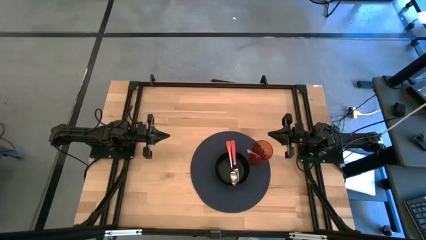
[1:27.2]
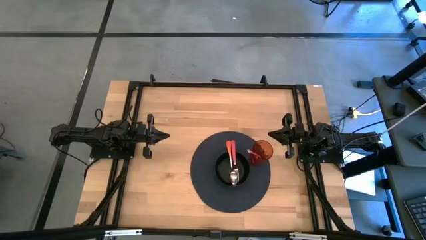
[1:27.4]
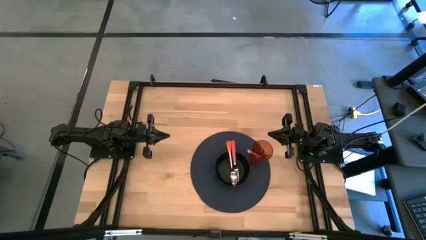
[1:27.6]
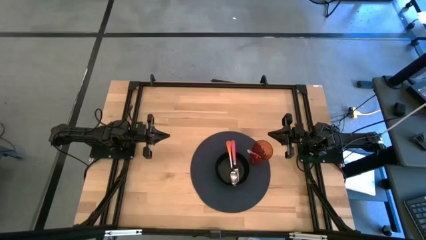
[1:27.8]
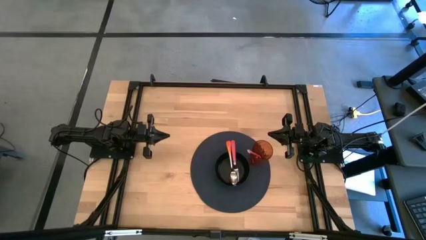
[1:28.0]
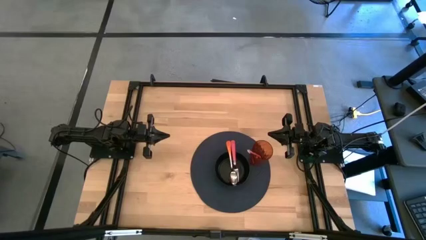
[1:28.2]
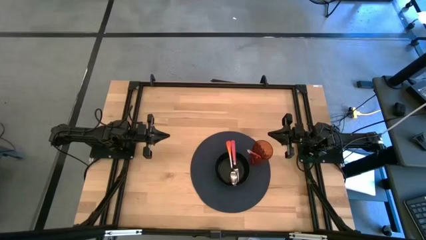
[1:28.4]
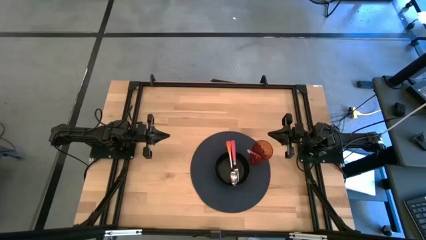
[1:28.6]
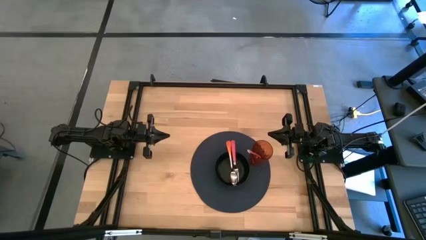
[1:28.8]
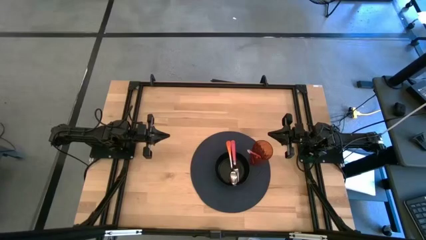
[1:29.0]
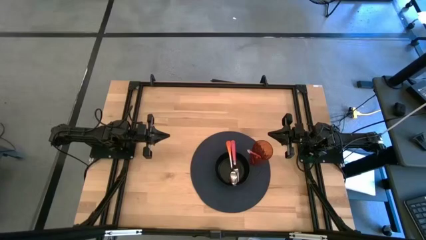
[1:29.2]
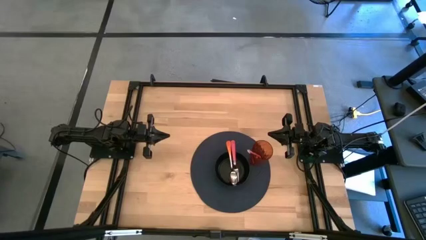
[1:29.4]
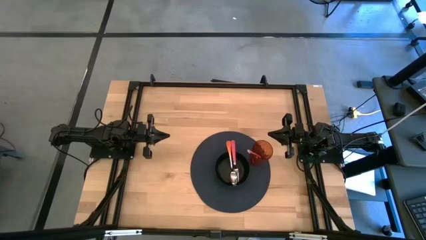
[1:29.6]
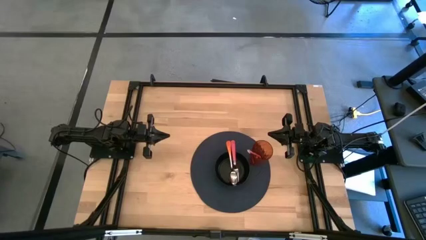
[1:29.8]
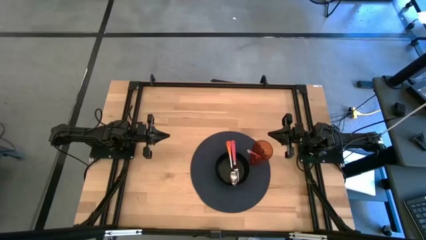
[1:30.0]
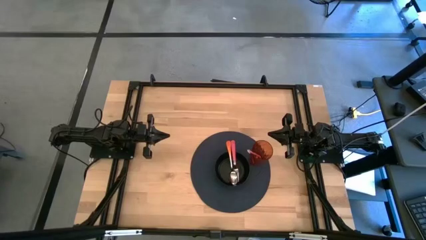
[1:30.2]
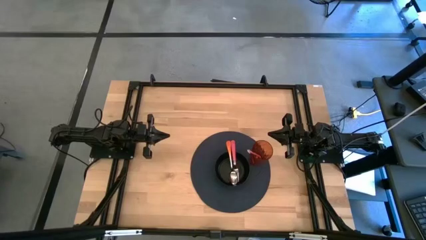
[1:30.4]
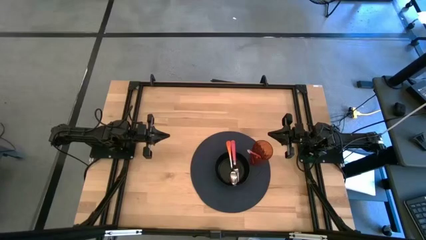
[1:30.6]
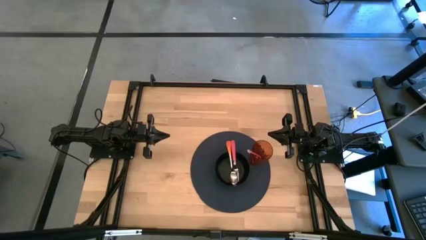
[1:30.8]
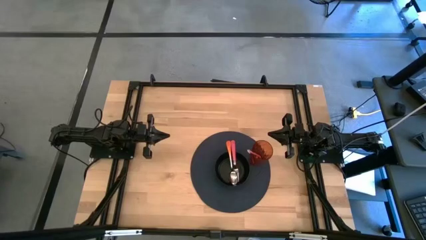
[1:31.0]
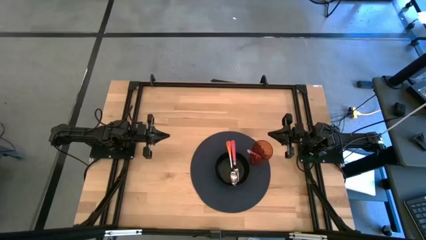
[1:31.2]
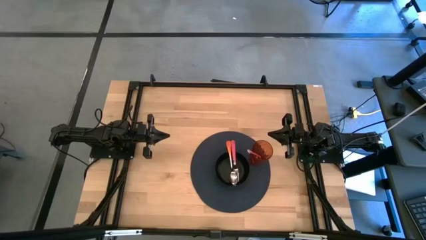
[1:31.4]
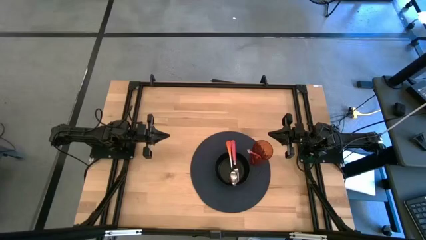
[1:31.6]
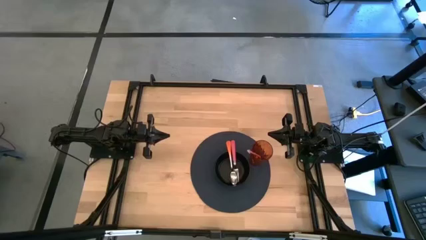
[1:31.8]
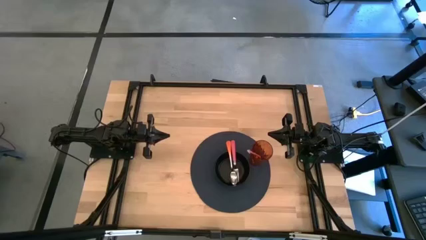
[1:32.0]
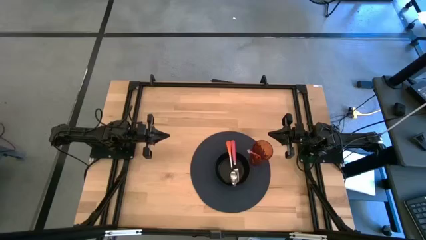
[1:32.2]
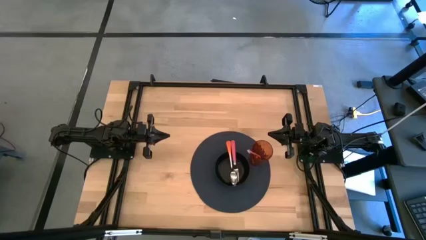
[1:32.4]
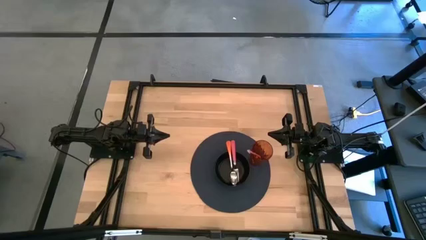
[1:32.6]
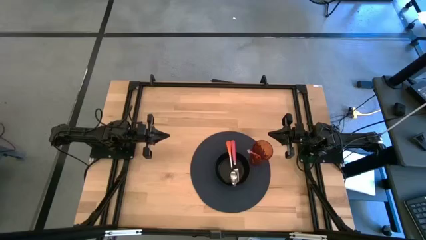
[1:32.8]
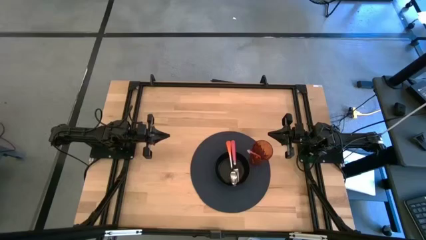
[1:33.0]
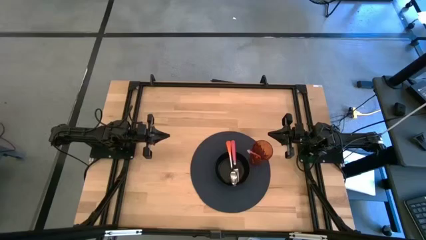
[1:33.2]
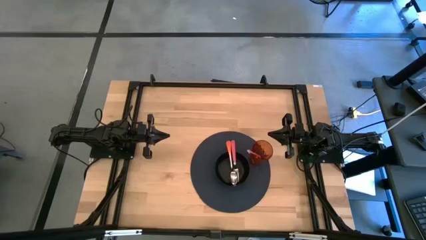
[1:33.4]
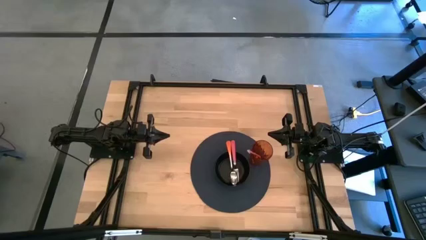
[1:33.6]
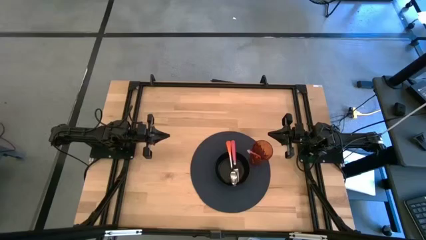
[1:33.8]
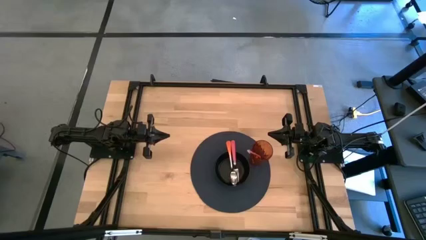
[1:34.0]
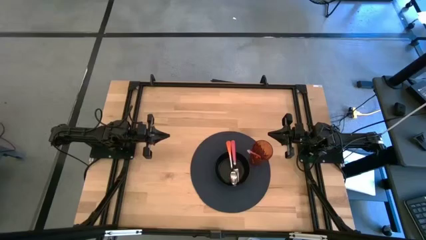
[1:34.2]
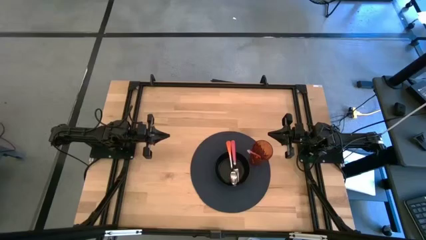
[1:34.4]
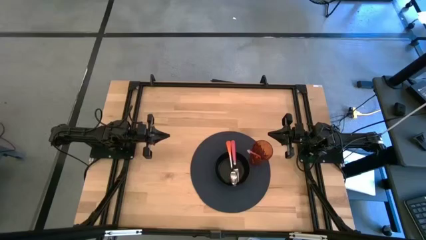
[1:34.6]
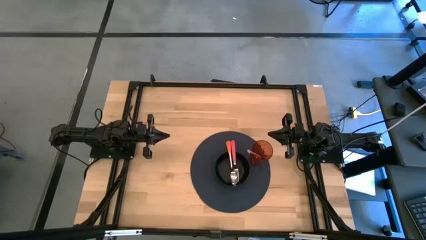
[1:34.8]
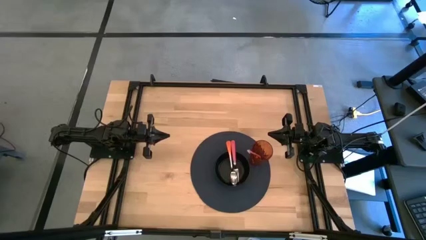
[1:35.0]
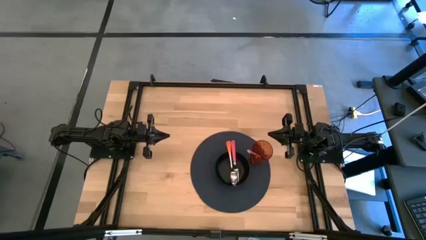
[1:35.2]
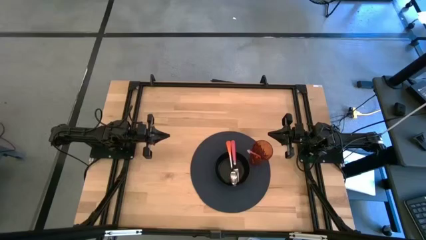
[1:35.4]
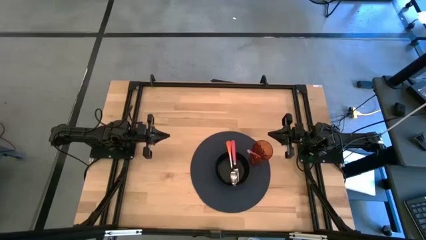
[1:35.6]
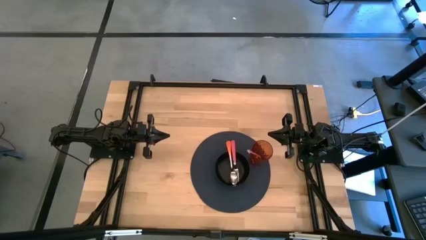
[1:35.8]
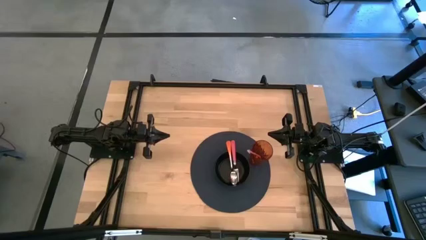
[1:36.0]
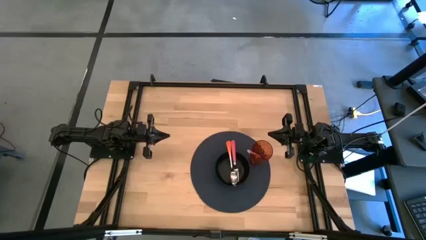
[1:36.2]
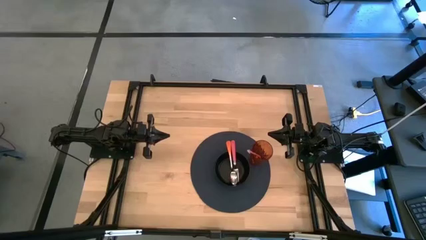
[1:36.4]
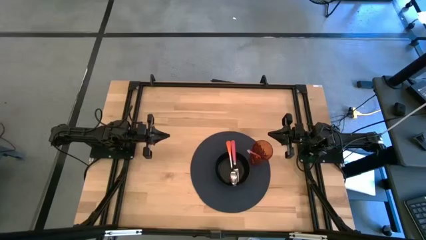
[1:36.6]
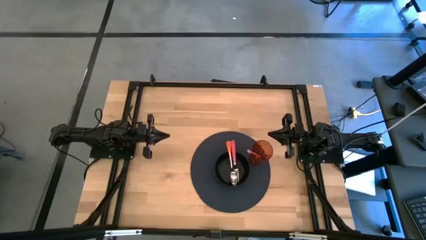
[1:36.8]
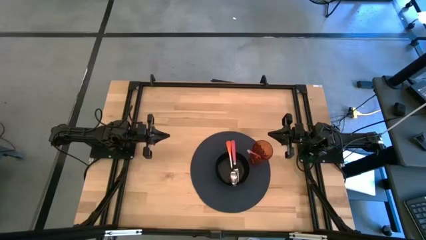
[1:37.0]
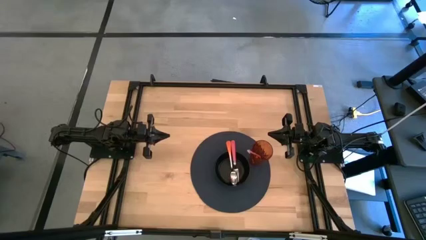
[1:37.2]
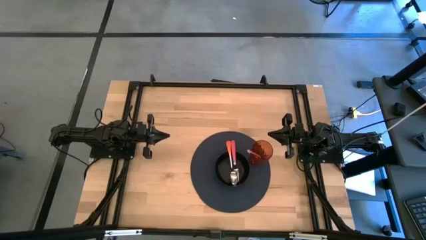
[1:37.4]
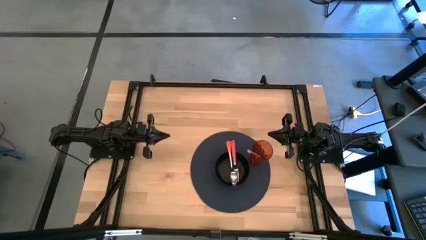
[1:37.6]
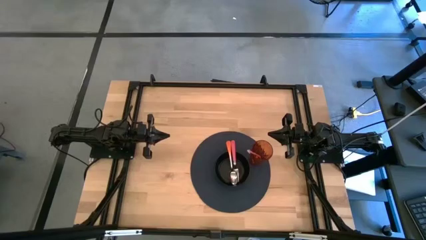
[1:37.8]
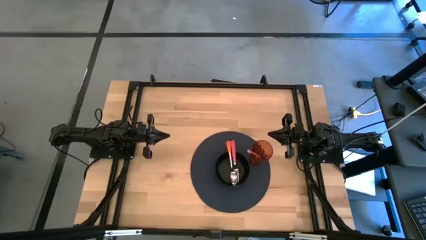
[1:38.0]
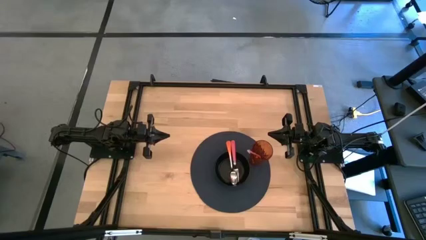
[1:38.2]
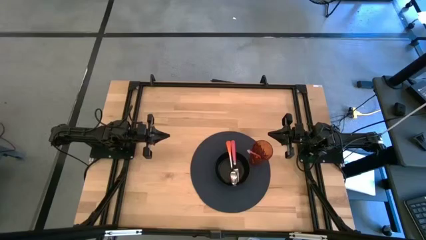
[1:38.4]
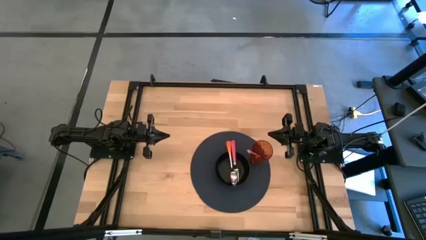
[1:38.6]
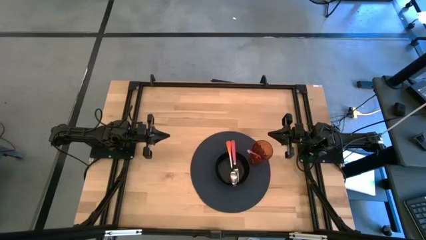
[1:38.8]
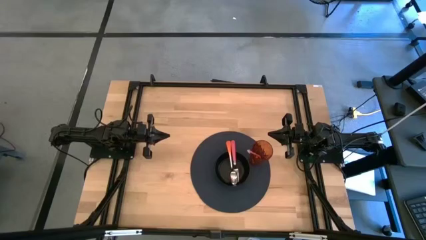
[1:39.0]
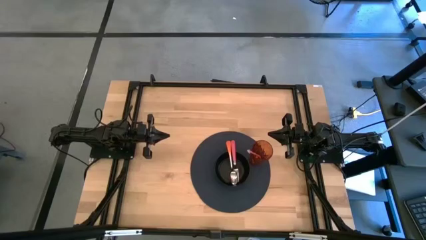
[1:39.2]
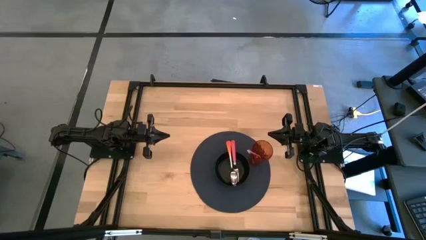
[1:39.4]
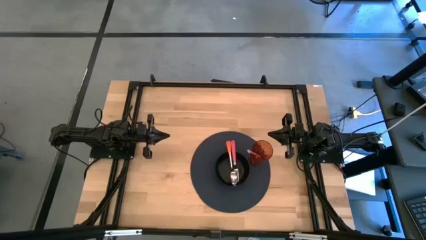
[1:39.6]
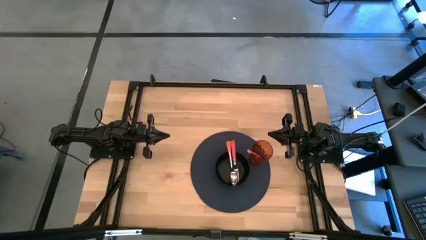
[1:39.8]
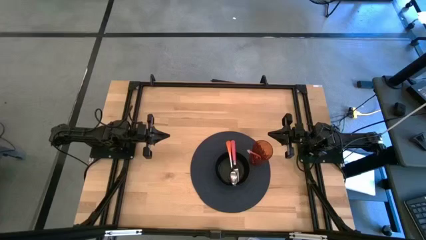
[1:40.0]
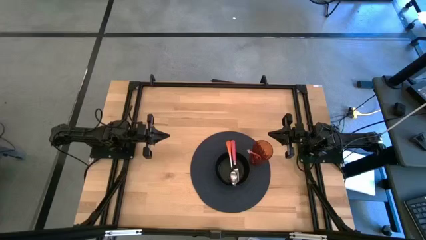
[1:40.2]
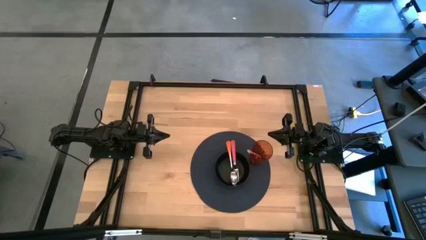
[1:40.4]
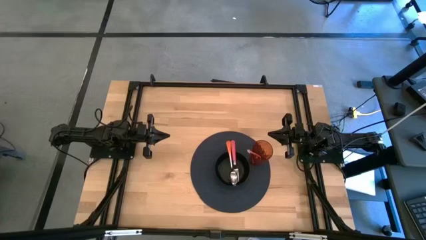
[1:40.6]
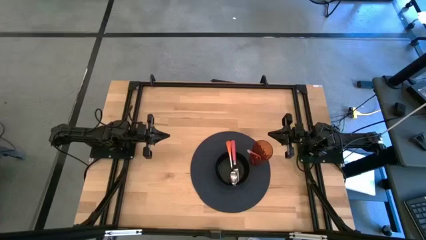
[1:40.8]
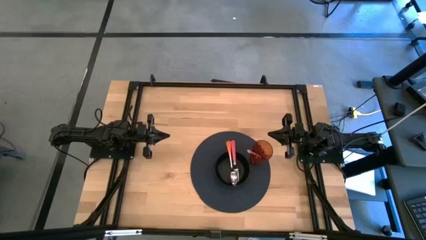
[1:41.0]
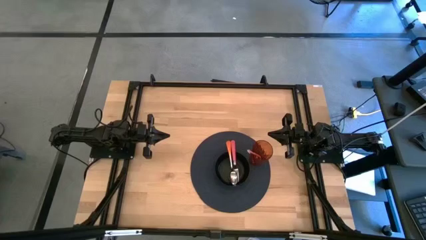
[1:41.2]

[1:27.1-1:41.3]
Task: Pick & Place Utensil
Return to Home Position

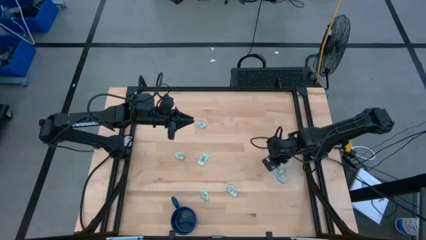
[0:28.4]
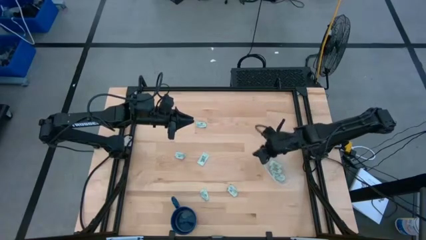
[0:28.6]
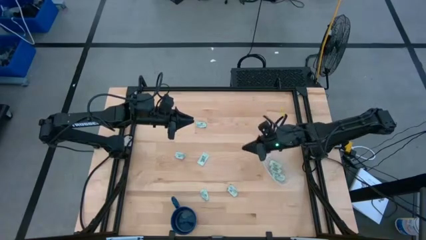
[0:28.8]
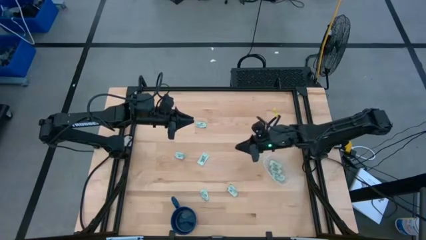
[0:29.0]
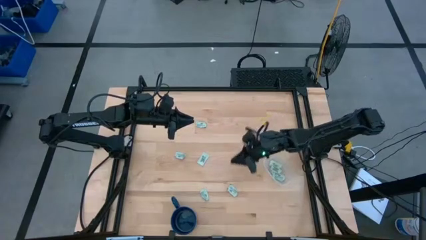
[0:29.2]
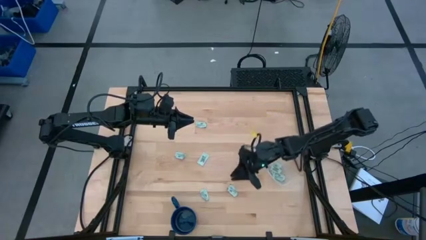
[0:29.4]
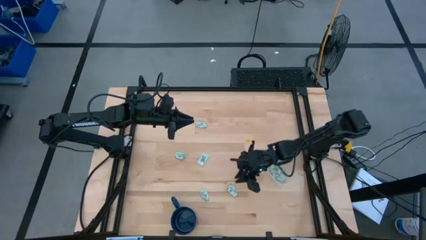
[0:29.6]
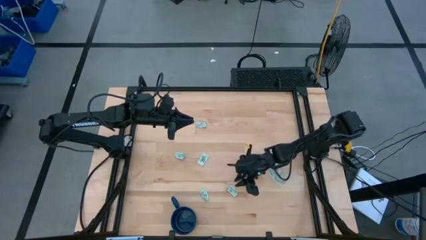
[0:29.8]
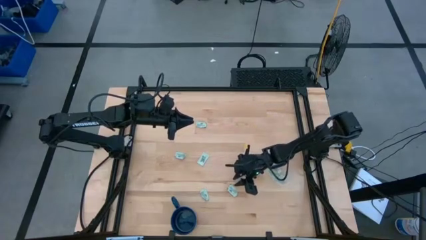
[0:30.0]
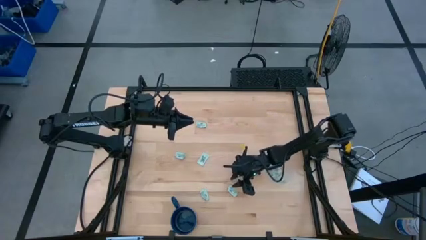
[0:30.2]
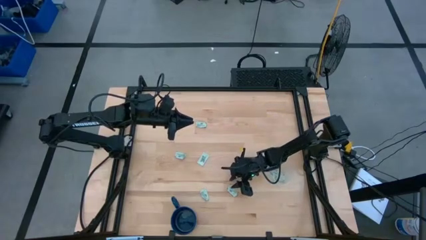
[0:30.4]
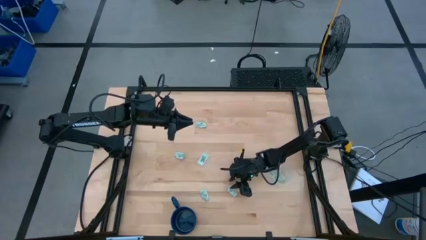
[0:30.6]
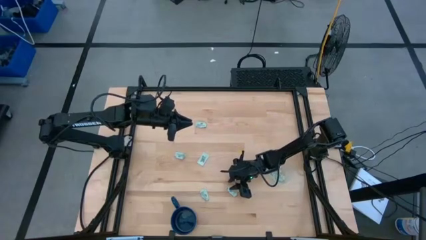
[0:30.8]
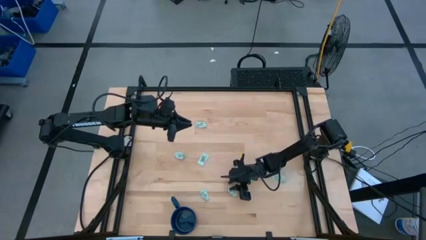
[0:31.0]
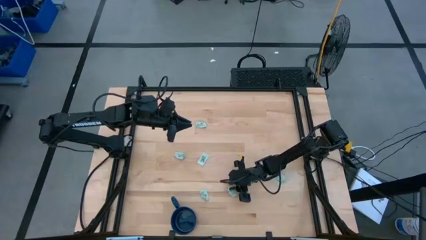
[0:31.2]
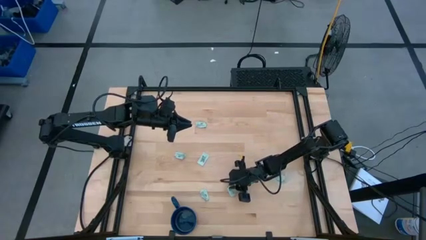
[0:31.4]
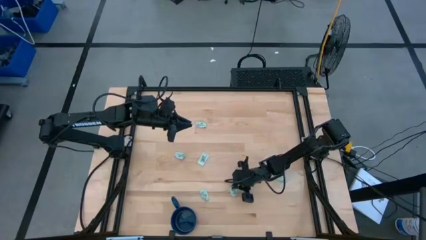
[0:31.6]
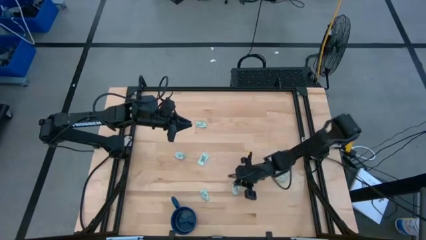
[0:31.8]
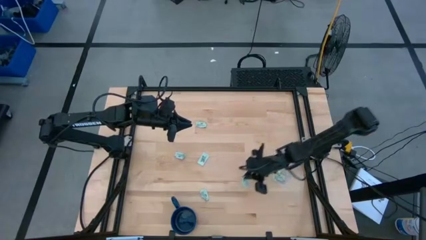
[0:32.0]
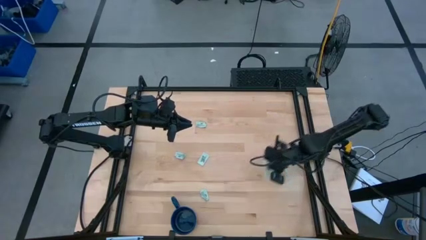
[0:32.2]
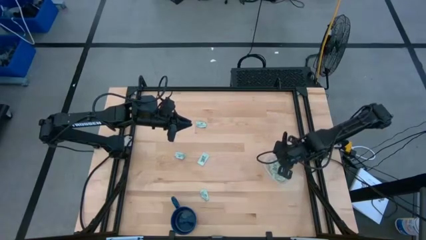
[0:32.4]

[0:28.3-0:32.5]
Task: Pick and place Stevia / Truvia into bins
Put the green stevia packet into the transparent container
